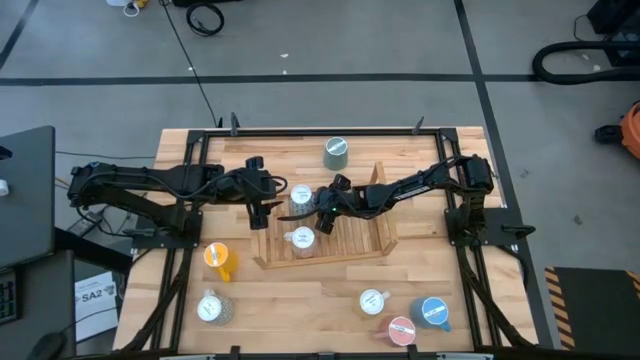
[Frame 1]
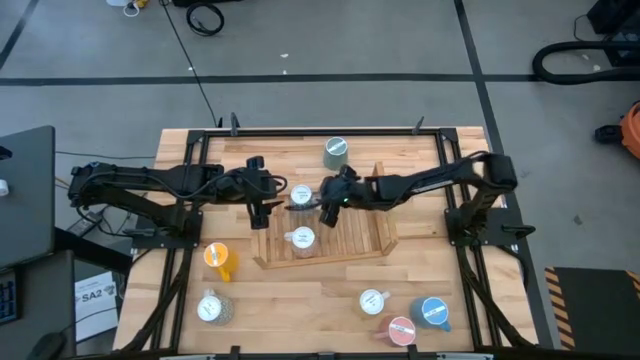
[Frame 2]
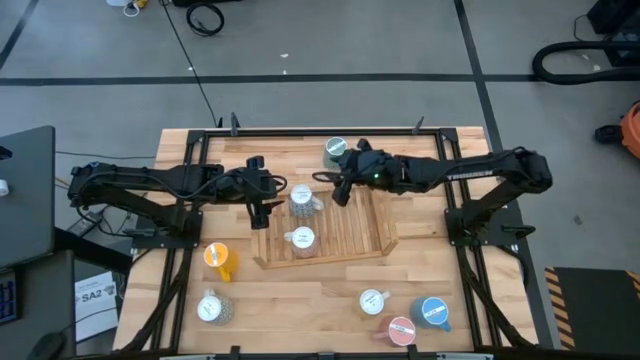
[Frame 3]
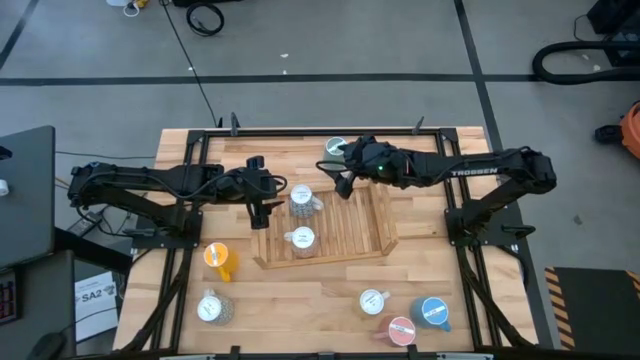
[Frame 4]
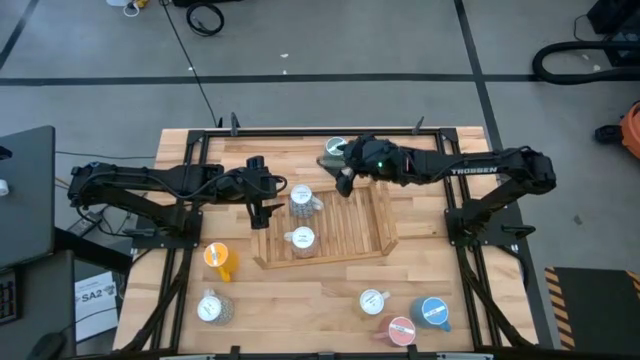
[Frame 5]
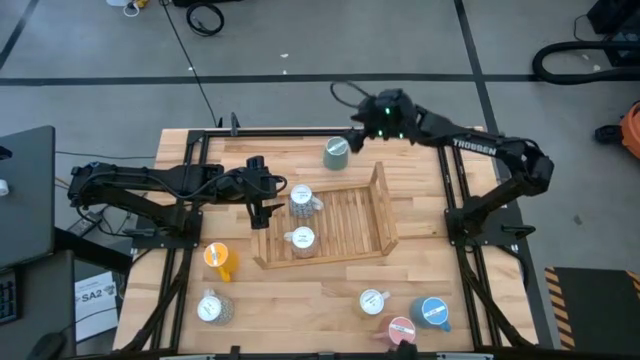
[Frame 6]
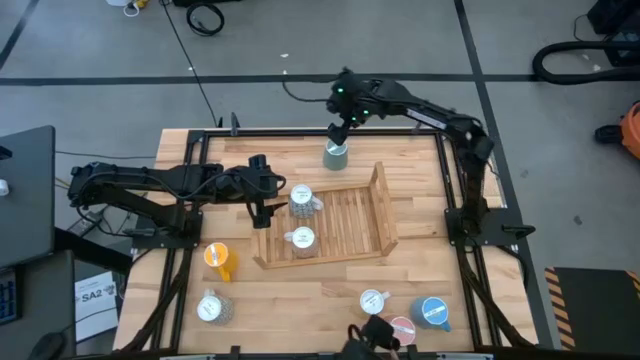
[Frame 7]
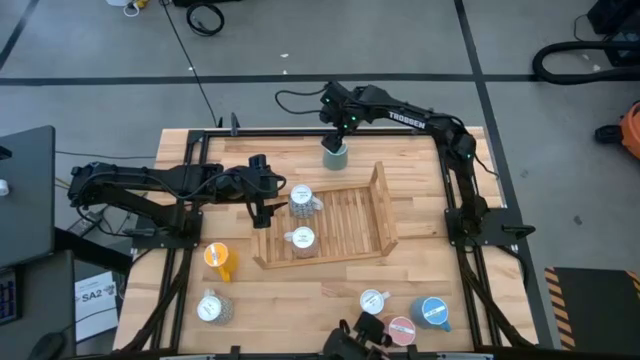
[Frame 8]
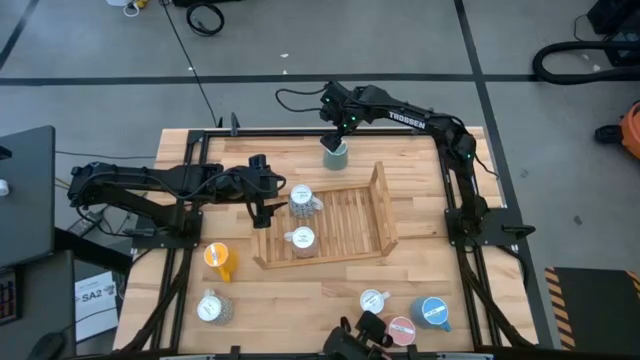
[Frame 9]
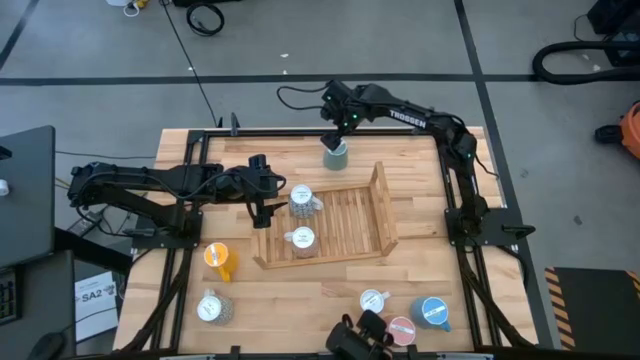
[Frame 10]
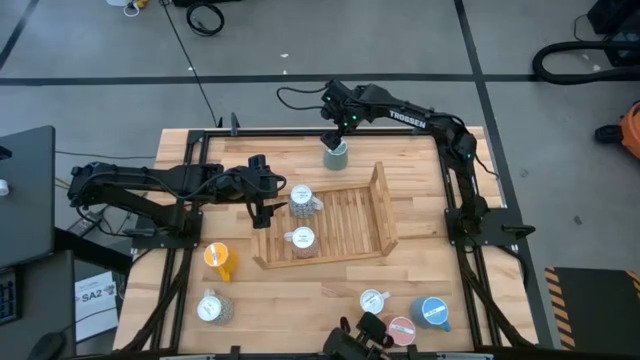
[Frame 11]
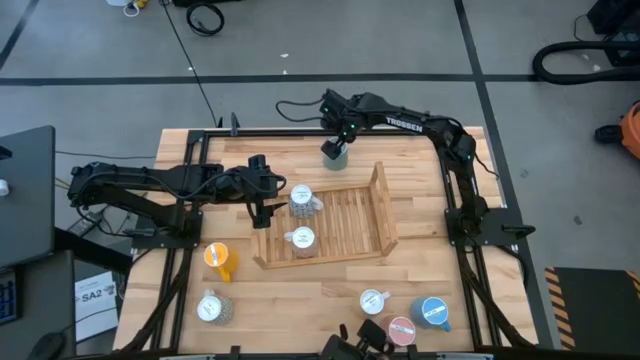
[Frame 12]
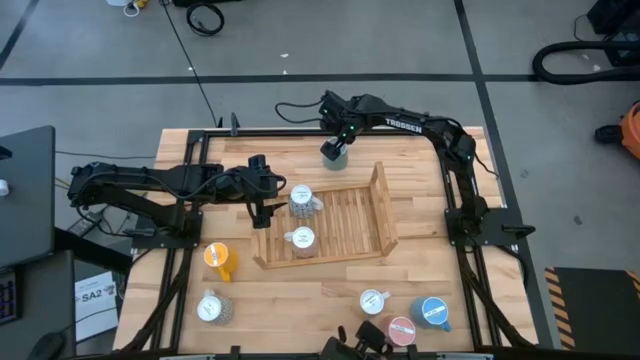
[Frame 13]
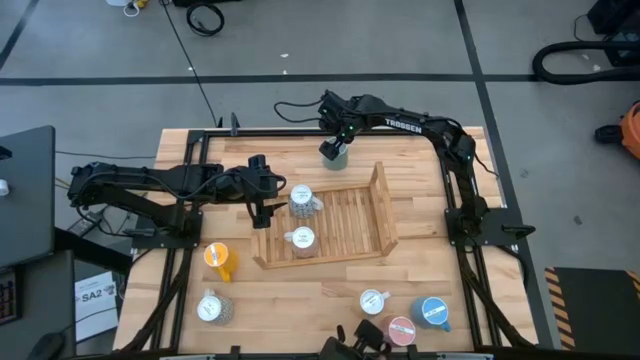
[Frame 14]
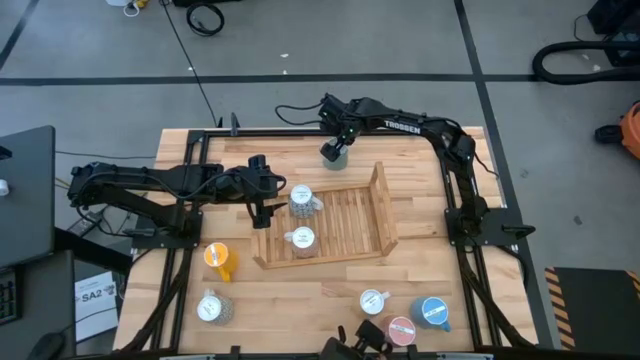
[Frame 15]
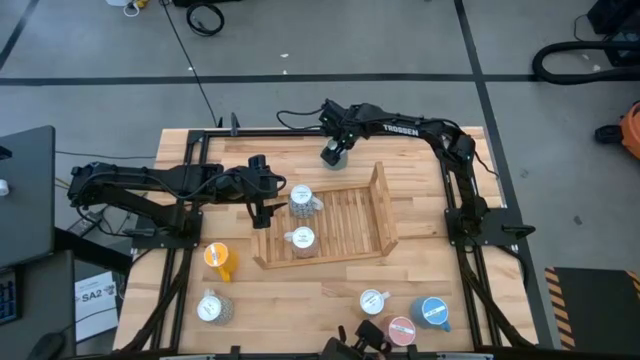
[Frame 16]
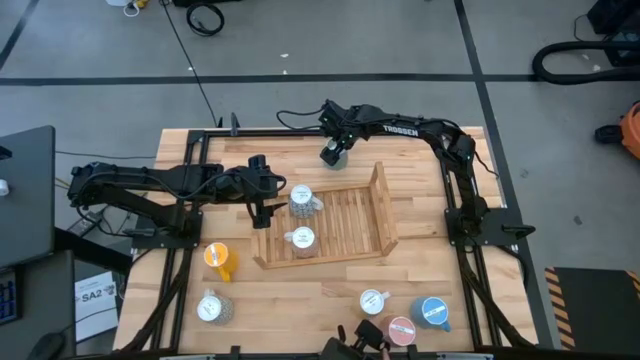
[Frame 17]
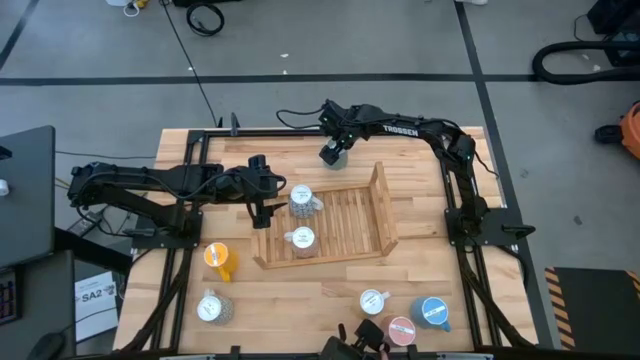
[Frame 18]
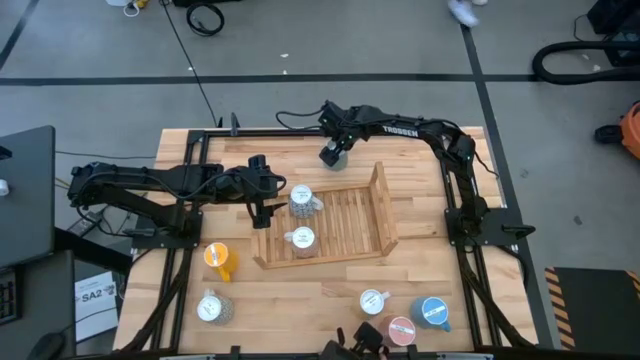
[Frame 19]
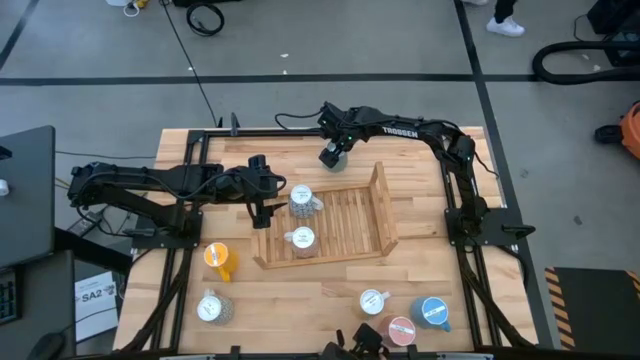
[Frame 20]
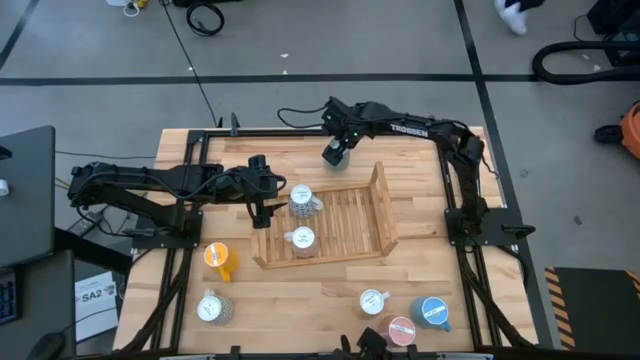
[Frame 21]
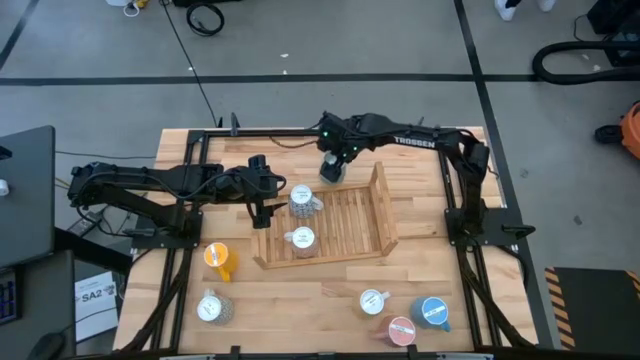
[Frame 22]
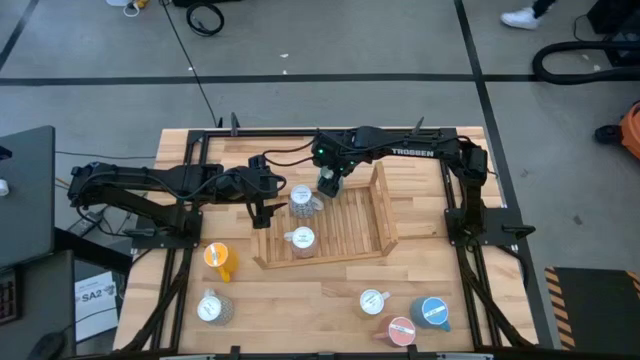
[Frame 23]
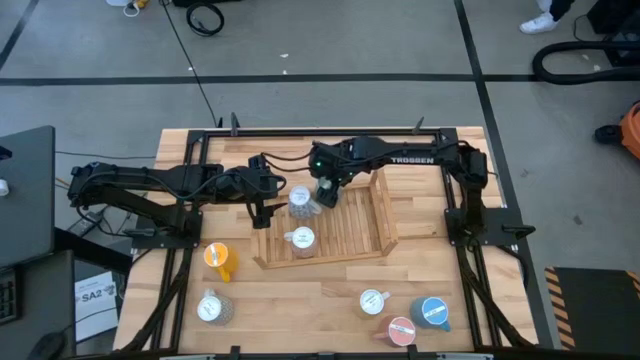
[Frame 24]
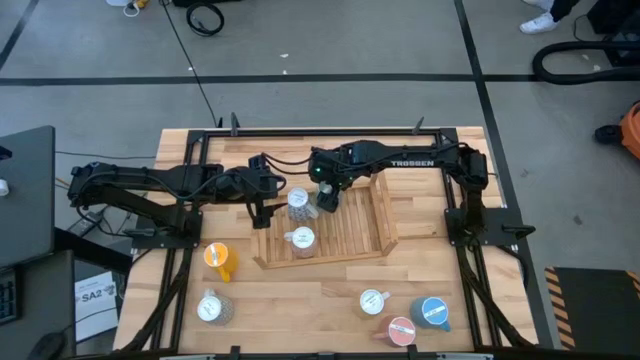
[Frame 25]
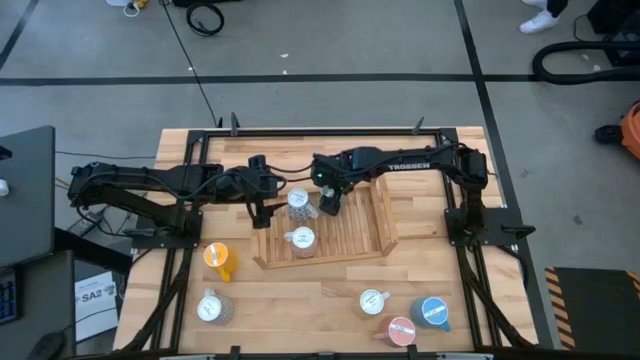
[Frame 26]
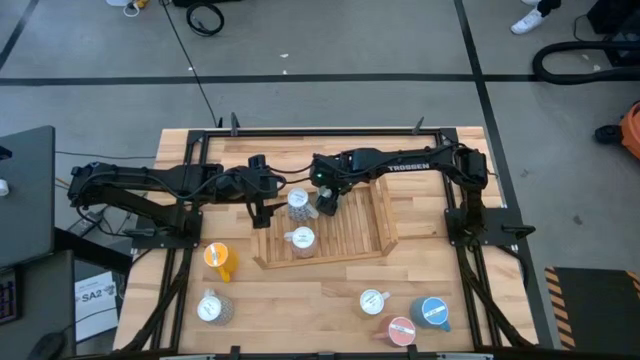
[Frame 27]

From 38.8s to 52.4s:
Task: Place coffee mugs
Put the green mug on the shelf

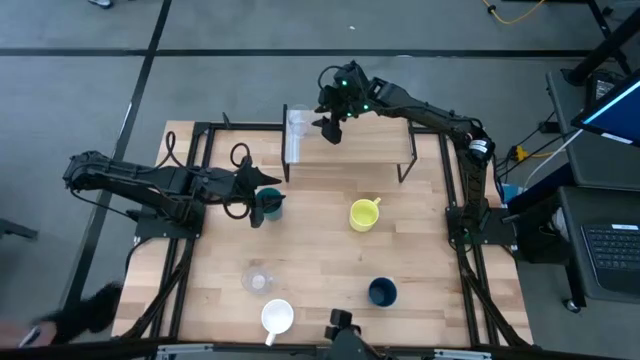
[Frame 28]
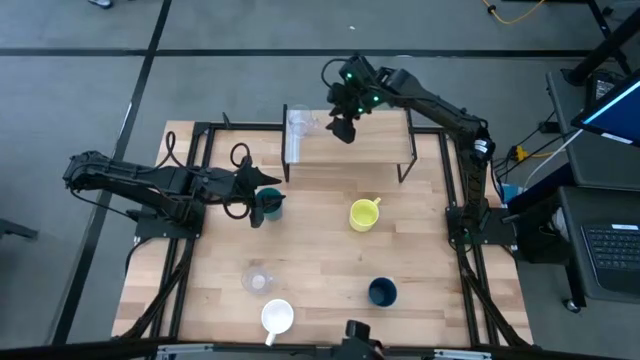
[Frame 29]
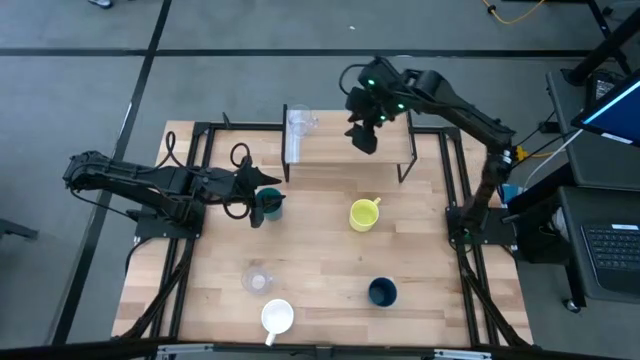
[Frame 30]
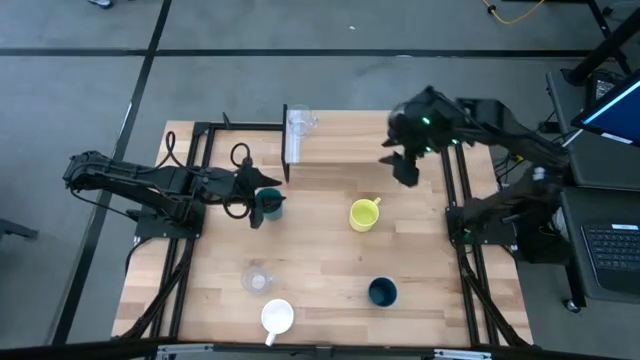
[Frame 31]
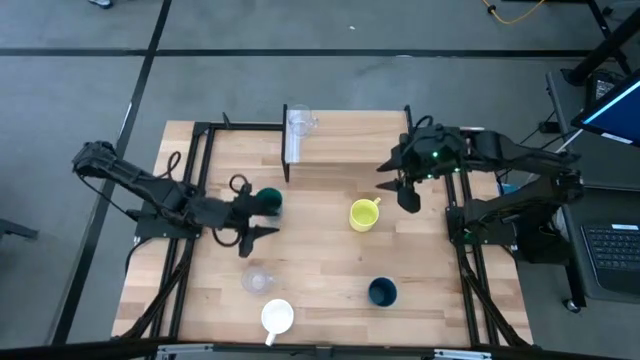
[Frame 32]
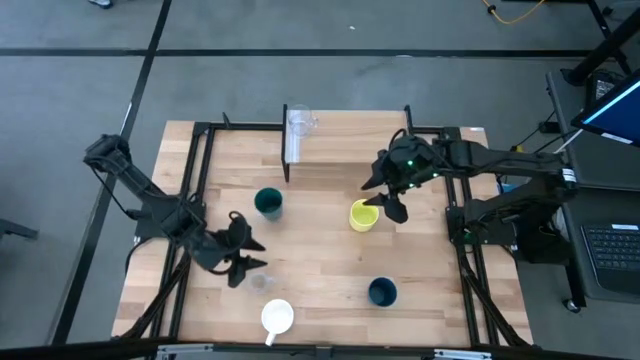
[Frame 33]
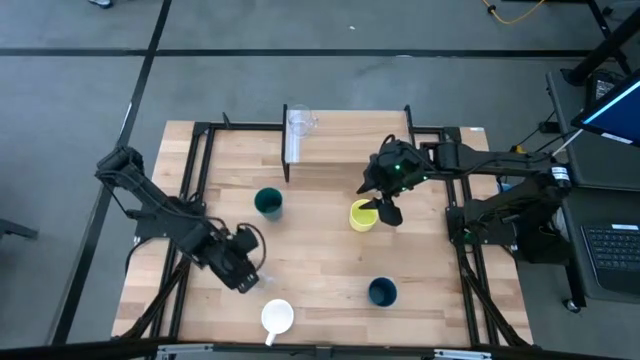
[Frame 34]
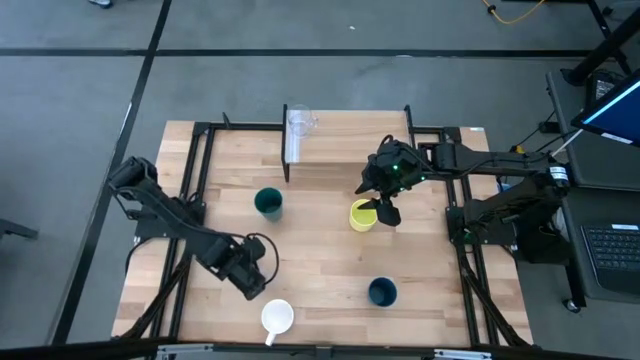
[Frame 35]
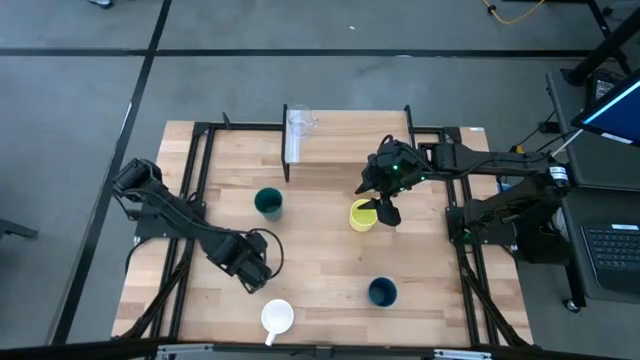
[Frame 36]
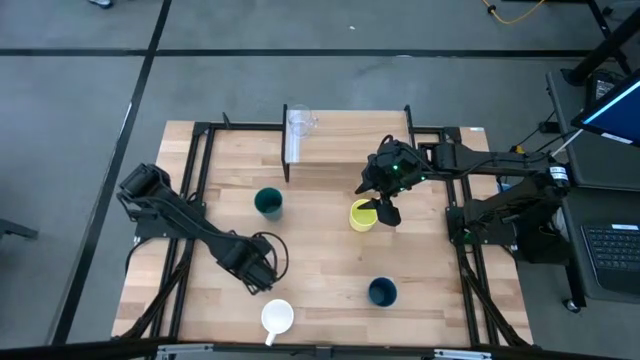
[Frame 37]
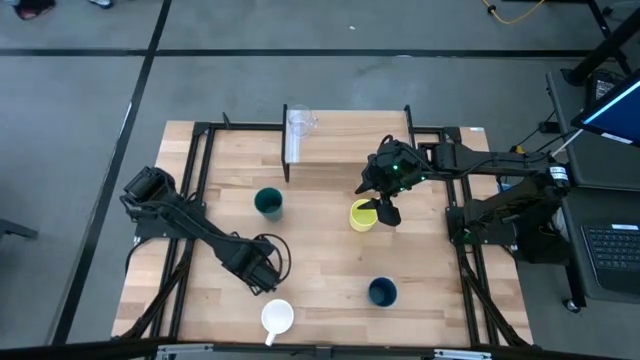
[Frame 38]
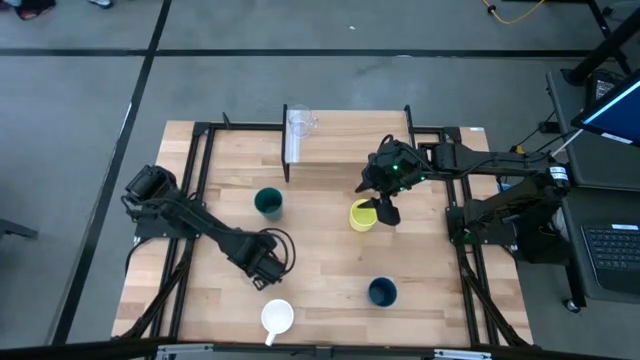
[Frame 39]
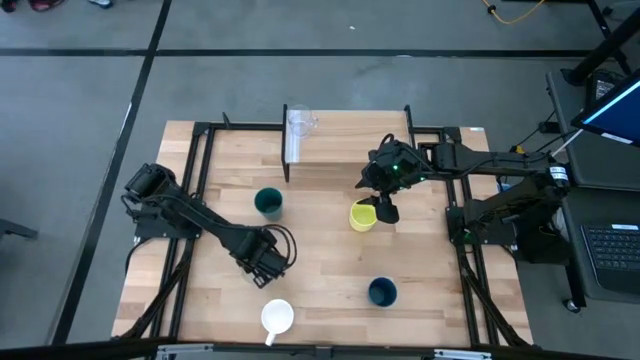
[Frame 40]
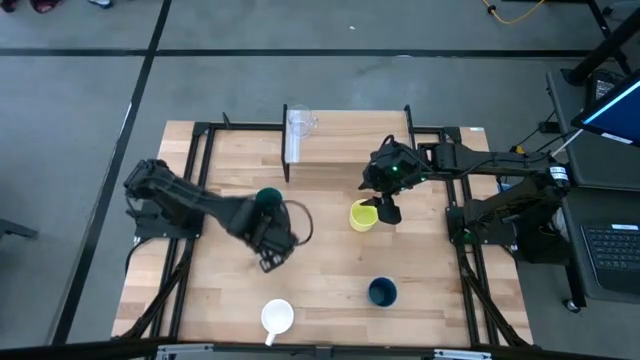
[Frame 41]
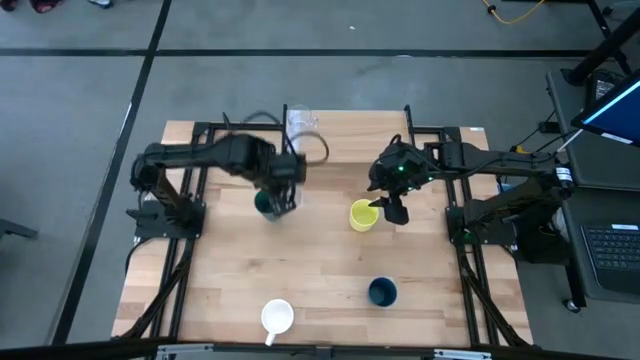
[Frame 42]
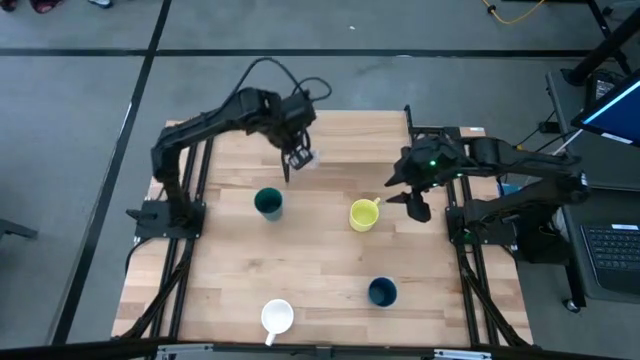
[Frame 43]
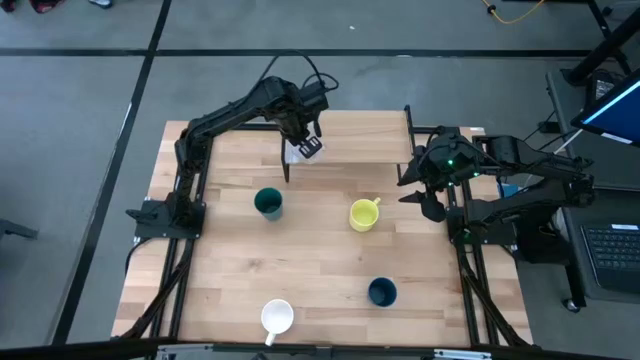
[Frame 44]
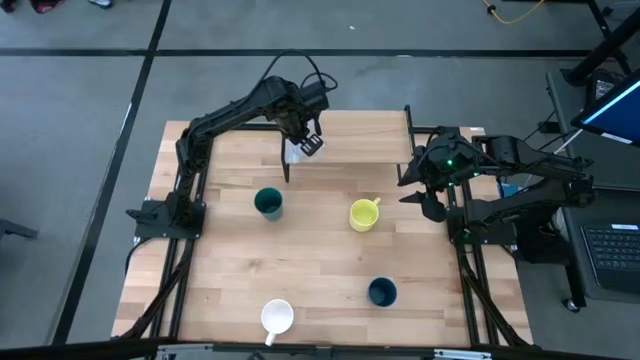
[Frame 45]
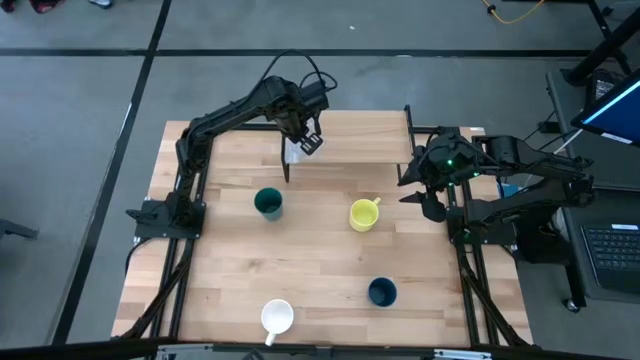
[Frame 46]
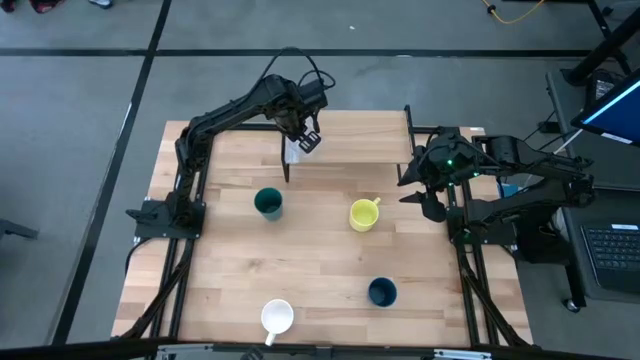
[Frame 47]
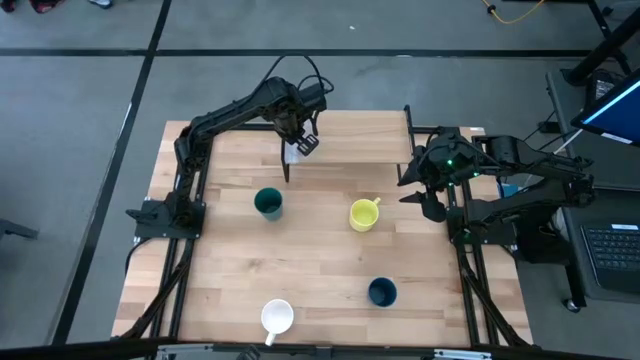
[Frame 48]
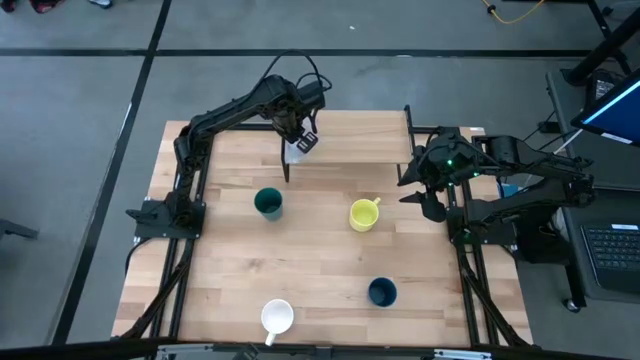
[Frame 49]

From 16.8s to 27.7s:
Task: Stack small to large cups/mugs on shelf
Put the transparent mug on the shelf, aligned with the other transparent mug
